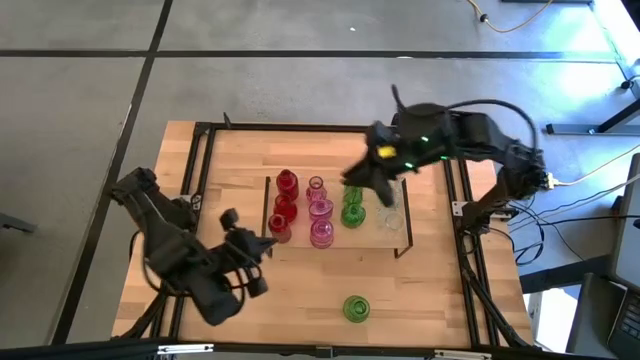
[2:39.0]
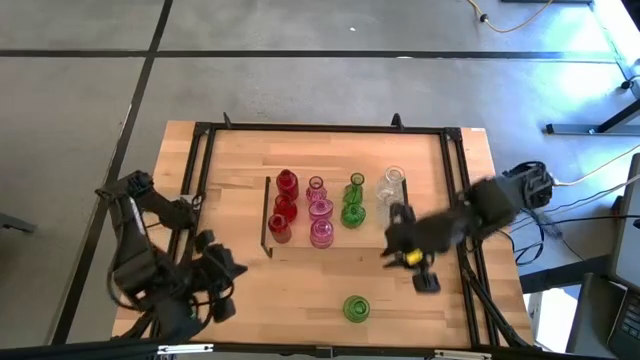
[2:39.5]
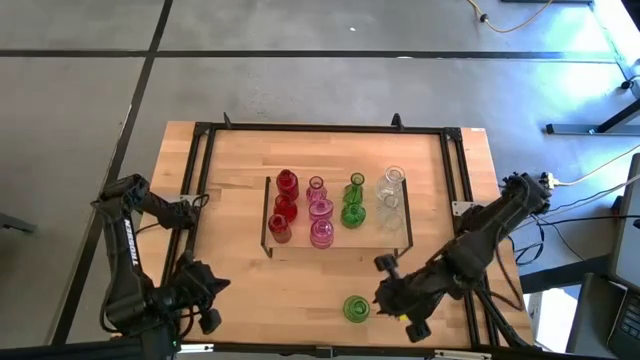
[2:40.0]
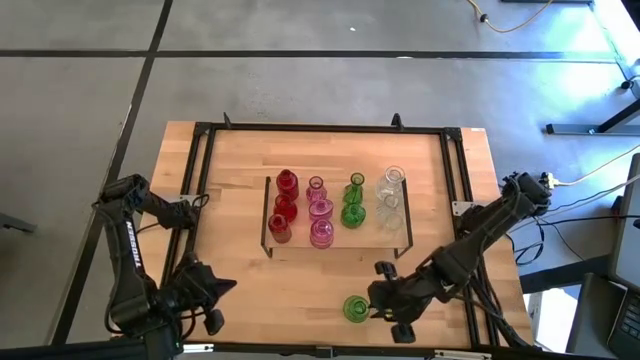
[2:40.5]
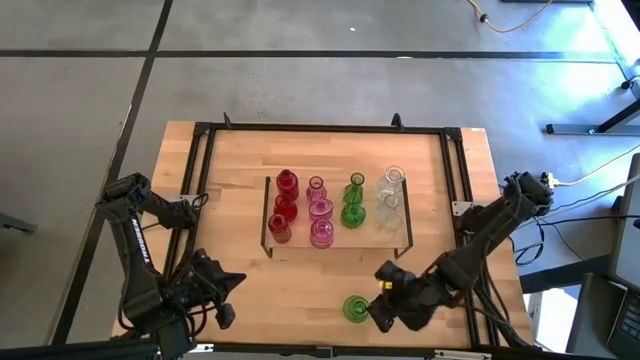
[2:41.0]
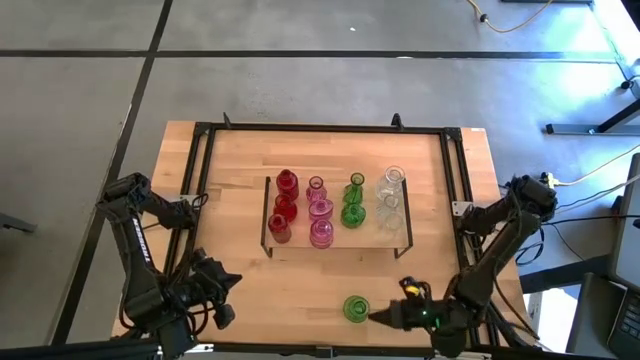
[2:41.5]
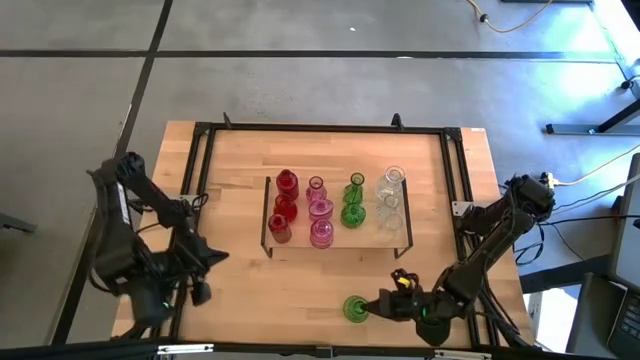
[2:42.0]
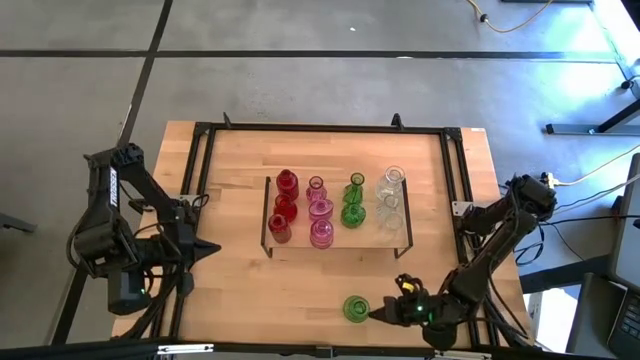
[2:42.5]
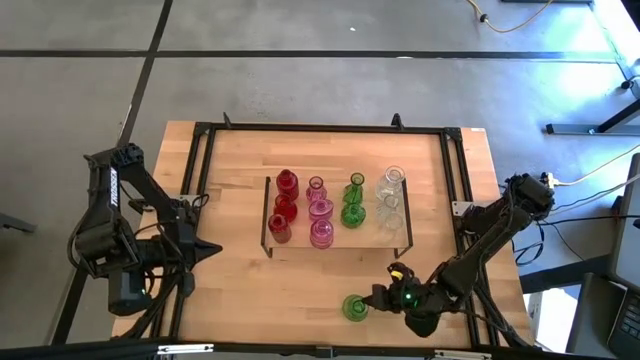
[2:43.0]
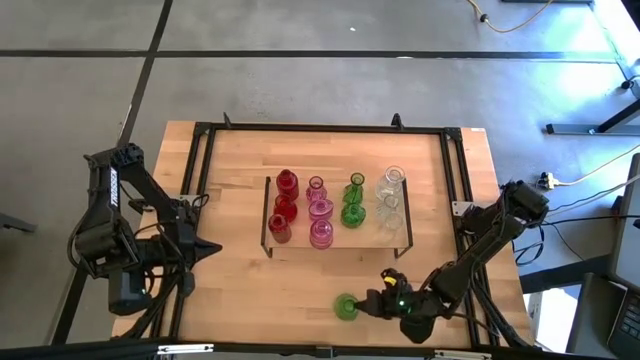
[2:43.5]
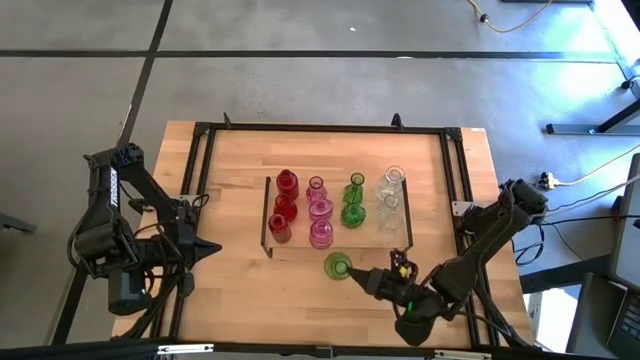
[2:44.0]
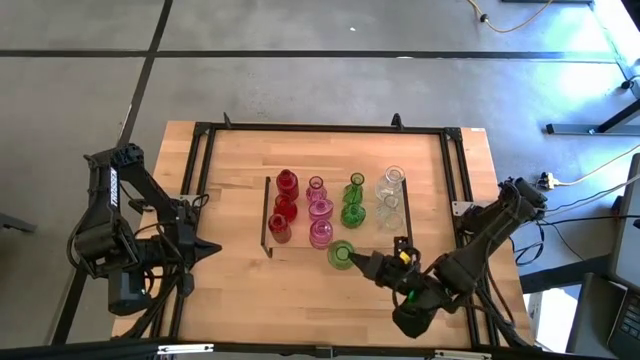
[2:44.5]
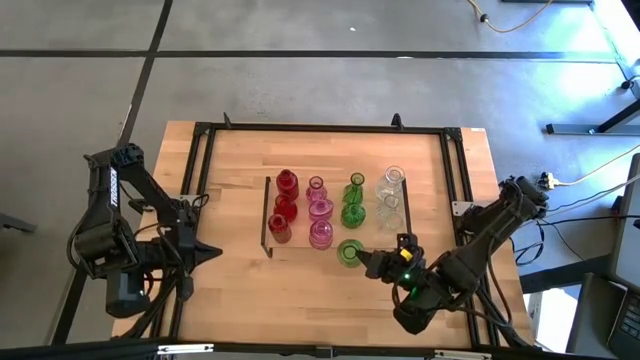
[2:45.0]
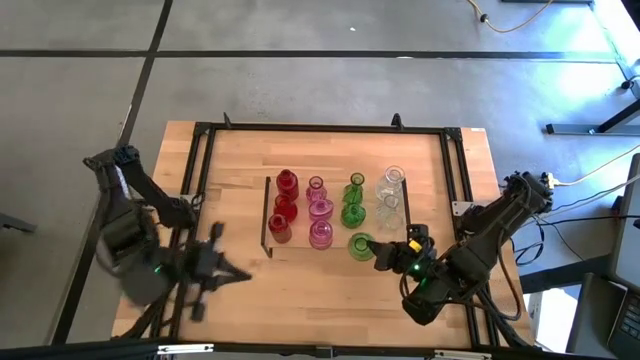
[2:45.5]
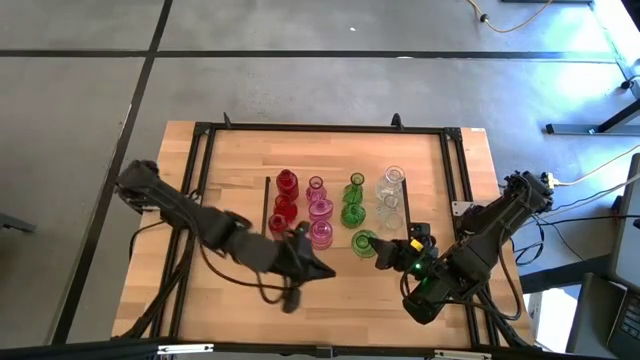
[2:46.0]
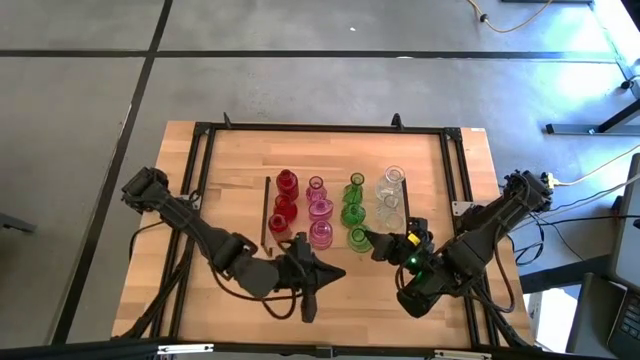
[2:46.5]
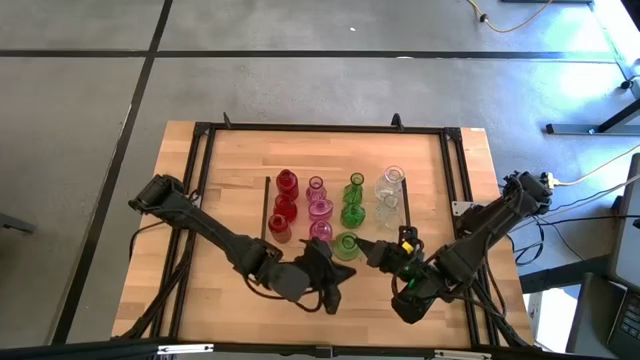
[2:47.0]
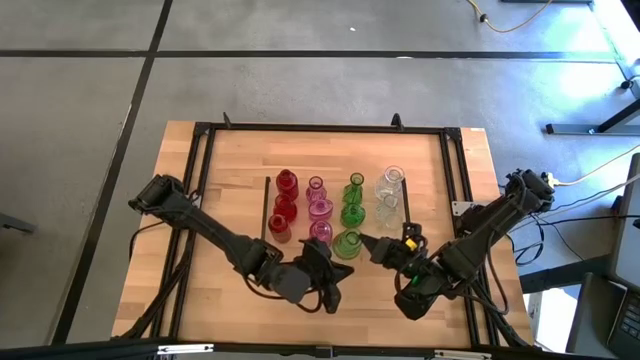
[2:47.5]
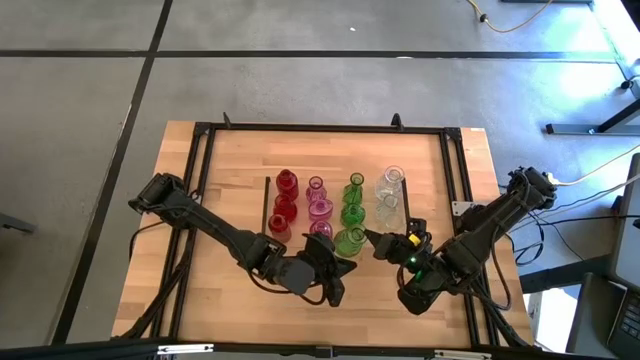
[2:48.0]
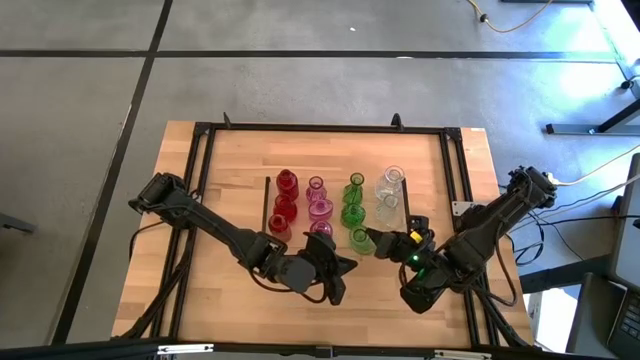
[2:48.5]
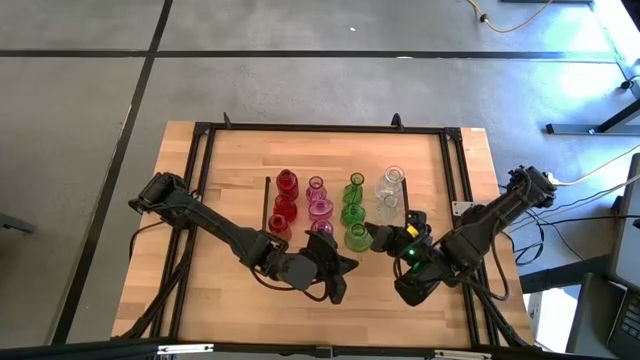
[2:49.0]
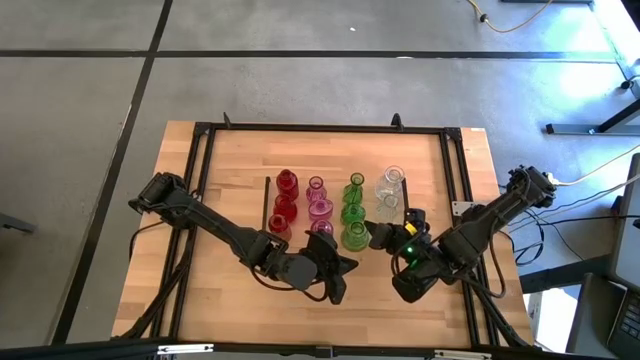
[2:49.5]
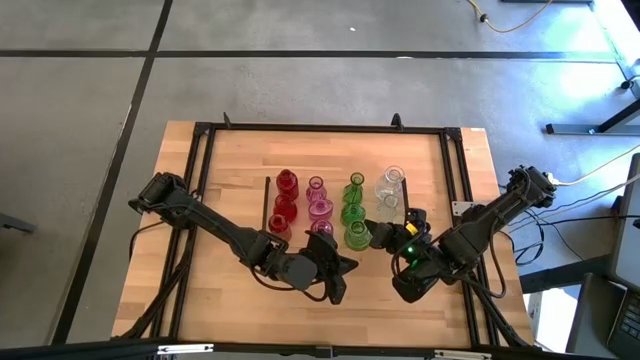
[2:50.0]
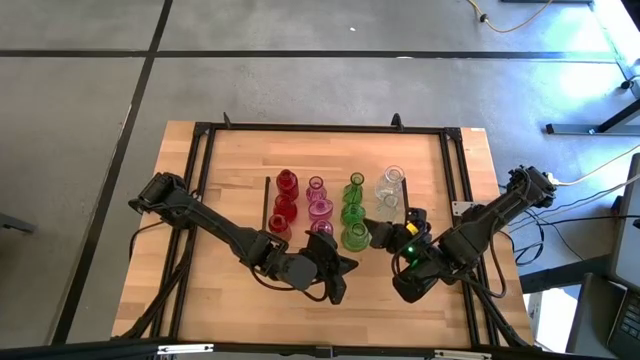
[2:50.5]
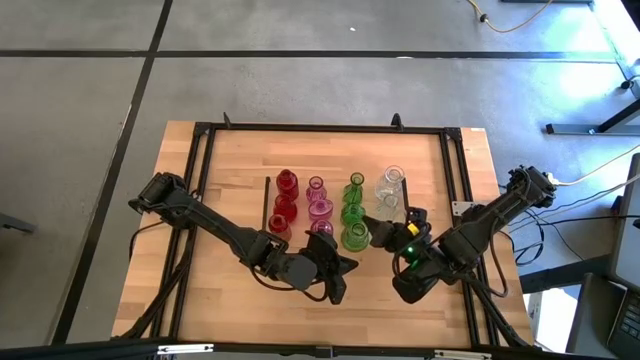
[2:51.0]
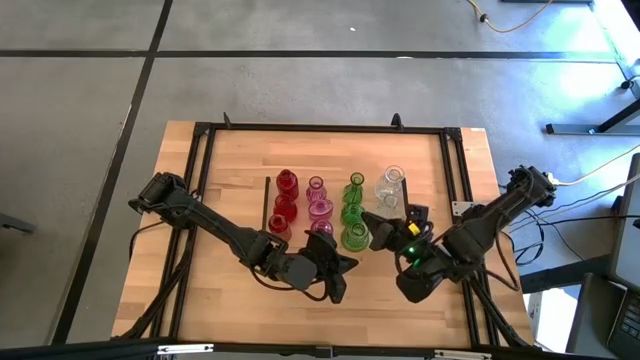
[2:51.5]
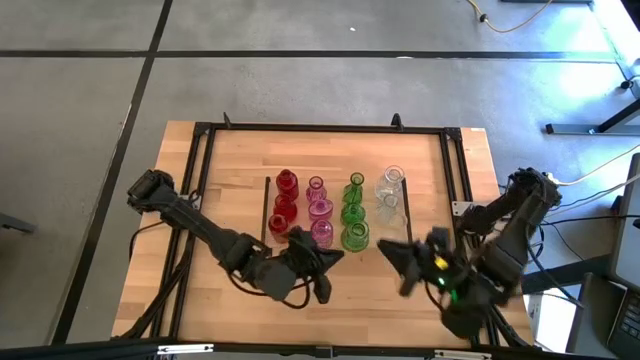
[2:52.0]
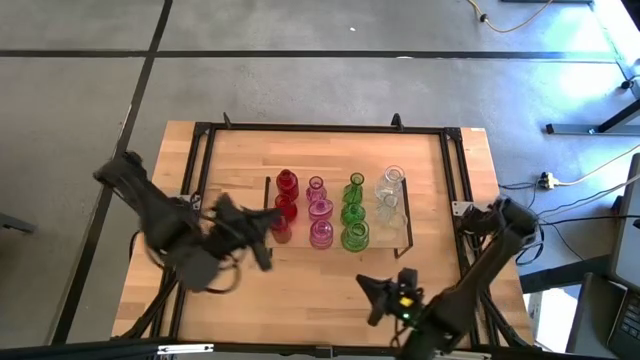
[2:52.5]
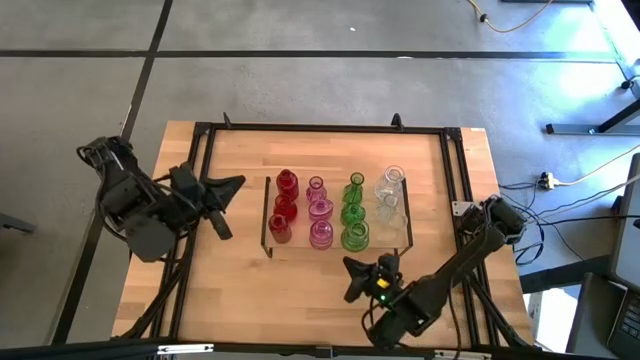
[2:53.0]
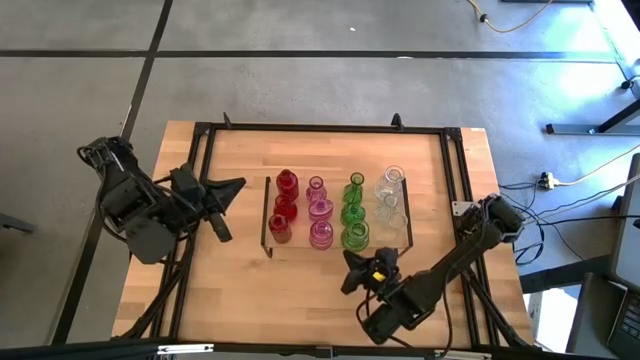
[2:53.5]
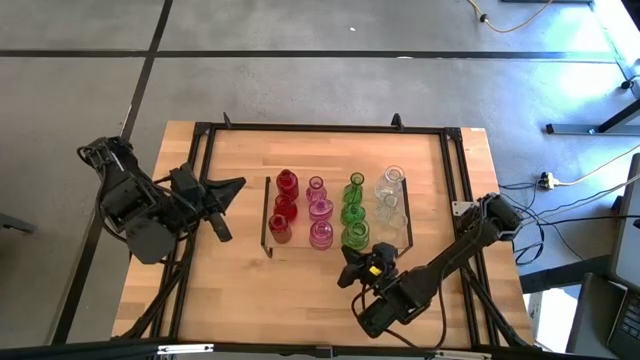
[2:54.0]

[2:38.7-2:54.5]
Task: sort vases onto shelf
Put the green vase on the shelf aligned with the other green vases

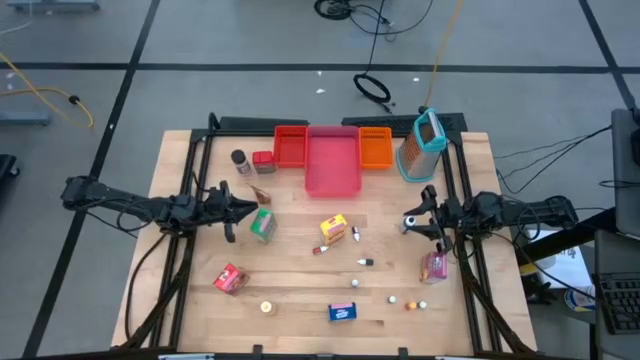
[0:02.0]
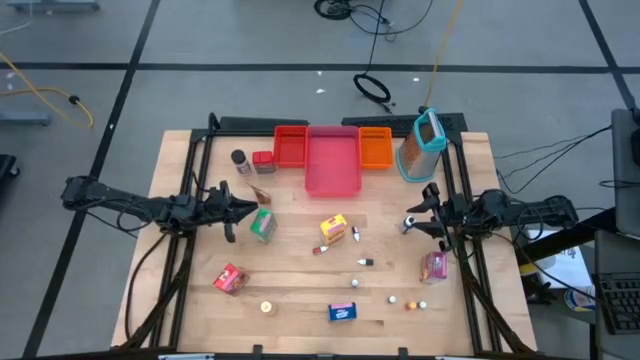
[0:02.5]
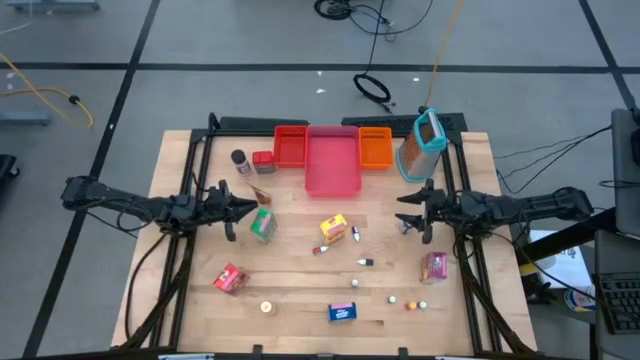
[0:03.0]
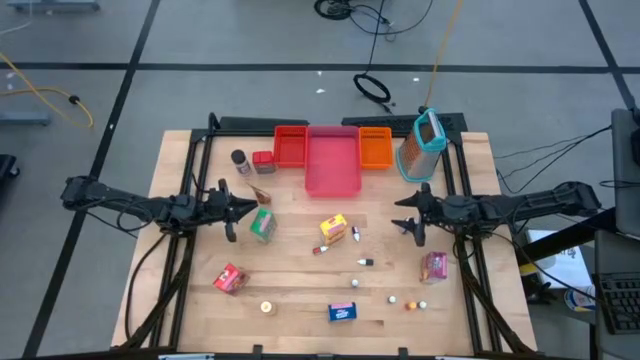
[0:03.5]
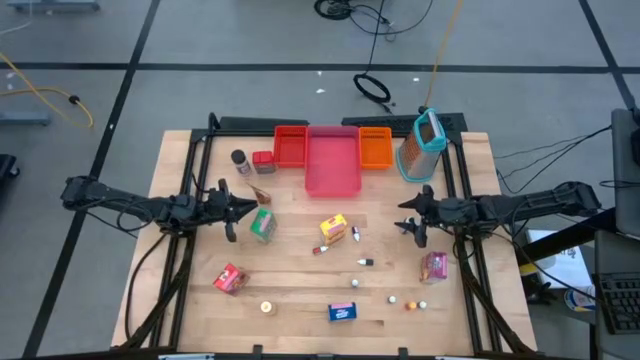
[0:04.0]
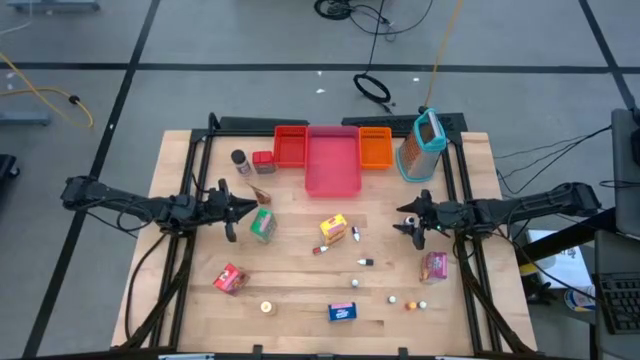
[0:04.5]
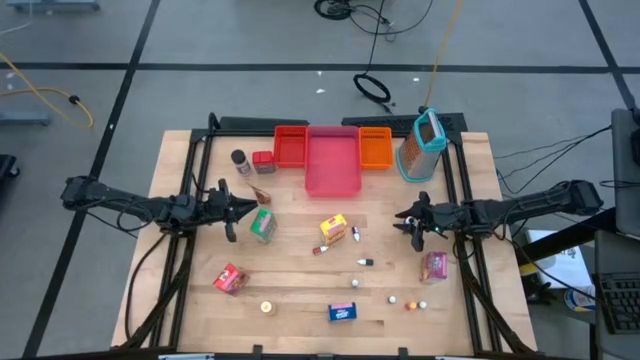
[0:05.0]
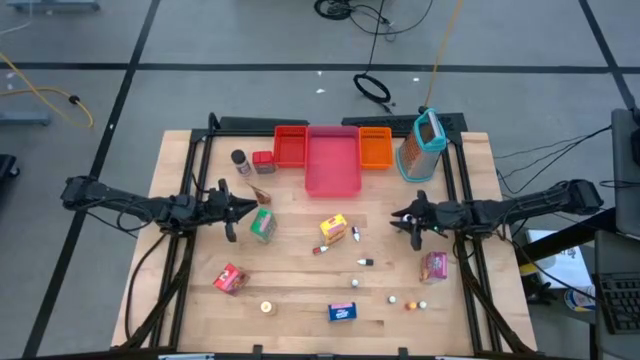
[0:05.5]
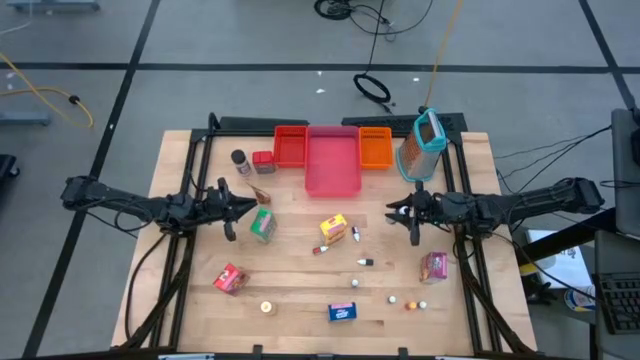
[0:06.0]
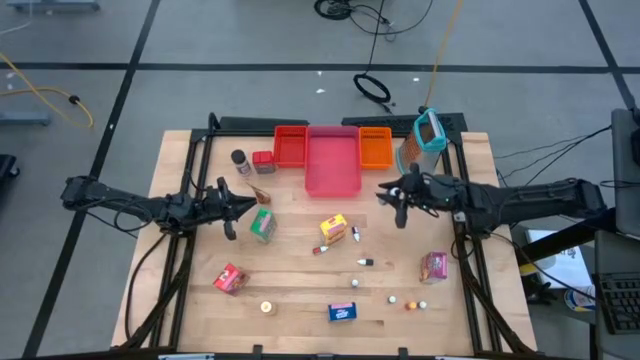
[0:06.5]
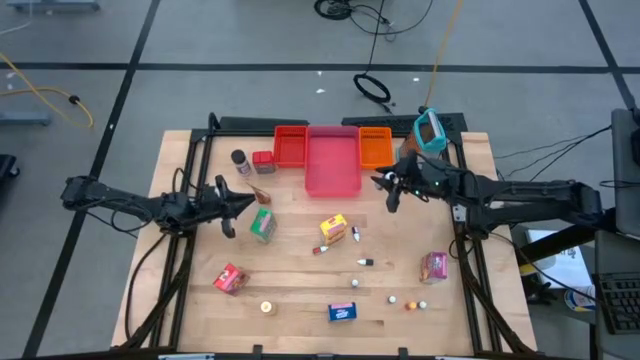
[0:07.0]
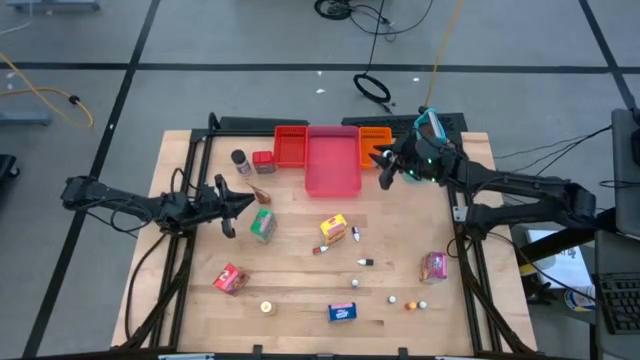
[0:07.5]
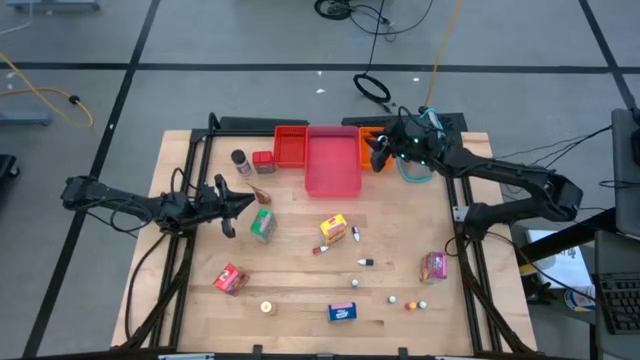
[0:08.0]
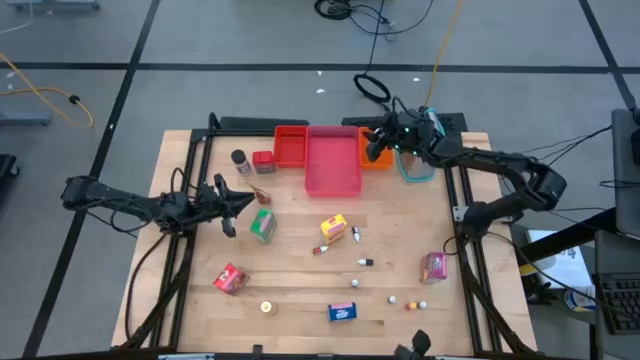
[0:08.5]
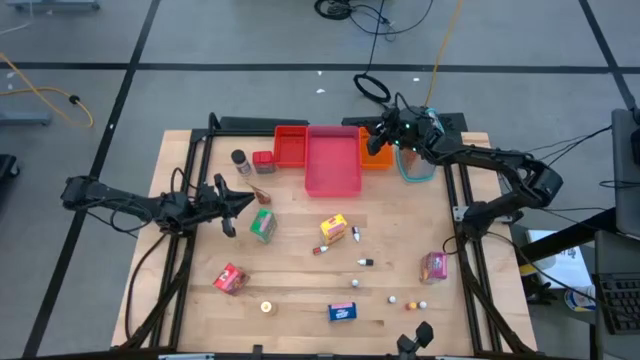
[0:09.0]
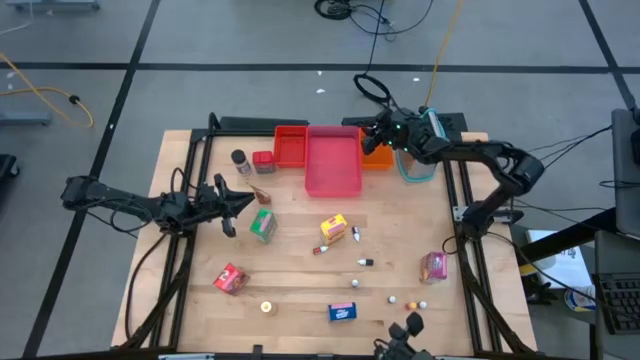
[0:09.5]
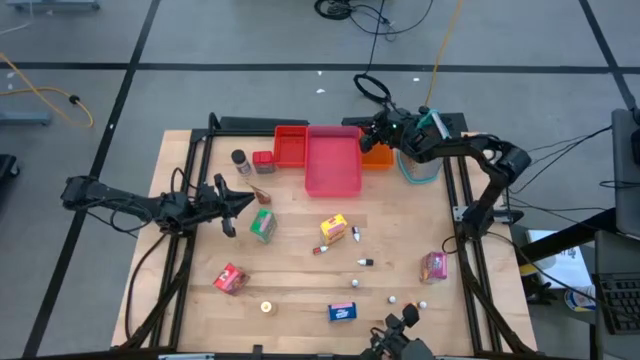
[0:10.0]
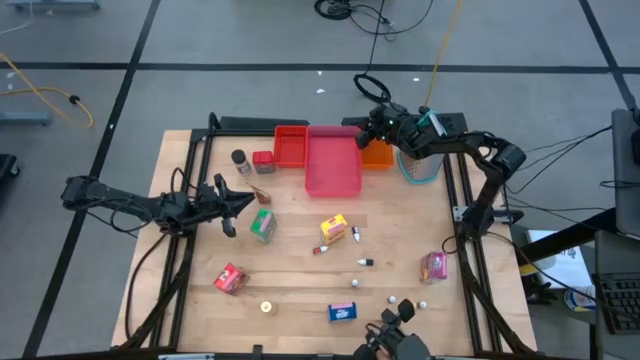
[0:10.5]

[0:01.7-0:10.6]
Task: Pick & Place Kitchen Items
Put the black food coloring bottle into the orange bin
